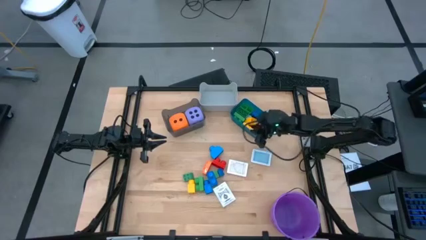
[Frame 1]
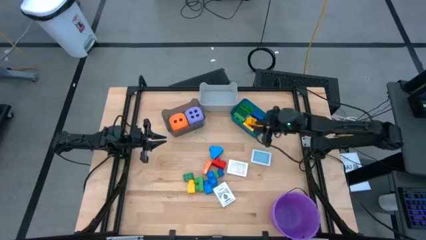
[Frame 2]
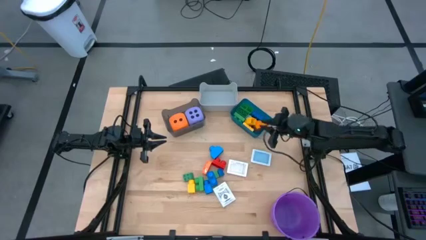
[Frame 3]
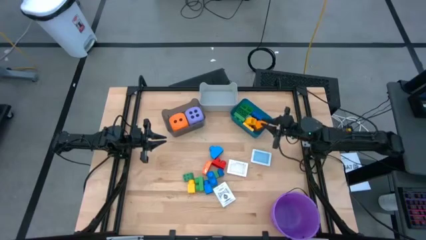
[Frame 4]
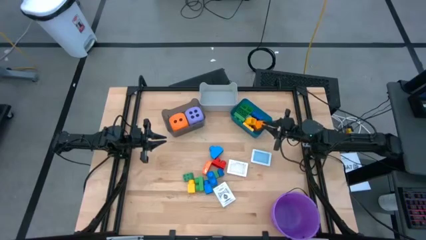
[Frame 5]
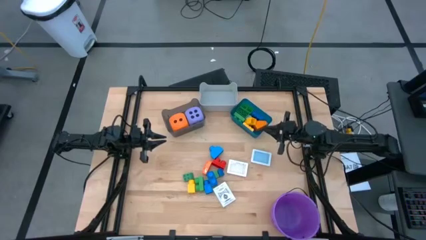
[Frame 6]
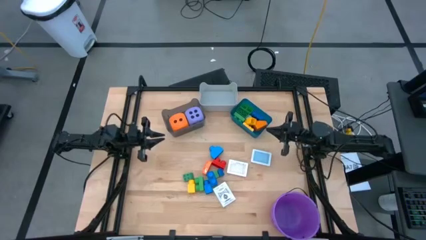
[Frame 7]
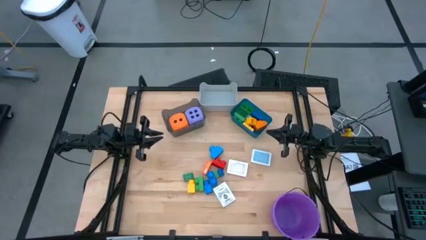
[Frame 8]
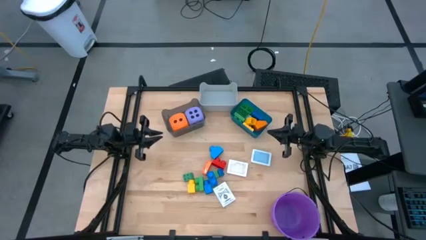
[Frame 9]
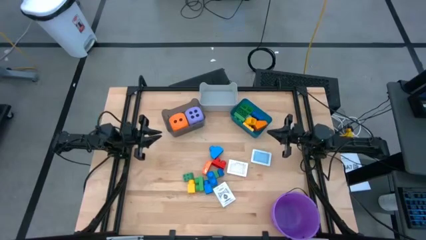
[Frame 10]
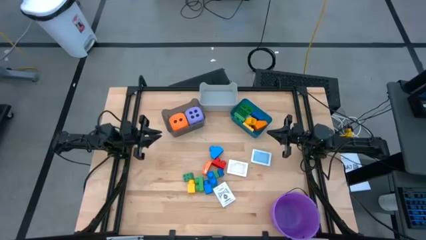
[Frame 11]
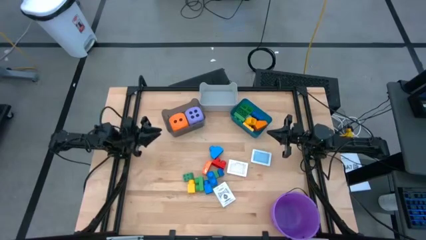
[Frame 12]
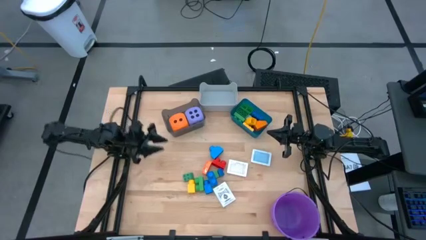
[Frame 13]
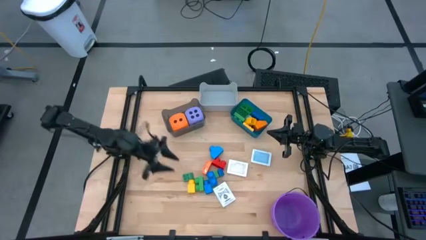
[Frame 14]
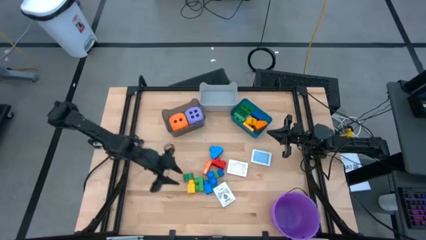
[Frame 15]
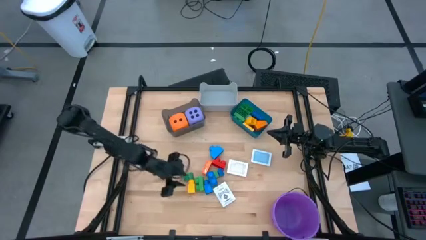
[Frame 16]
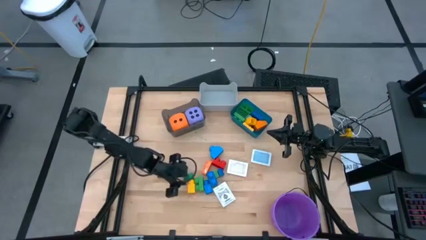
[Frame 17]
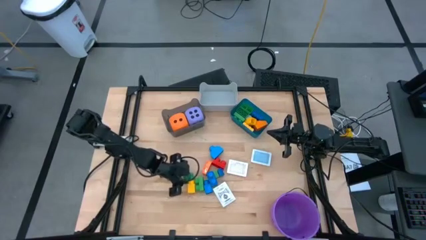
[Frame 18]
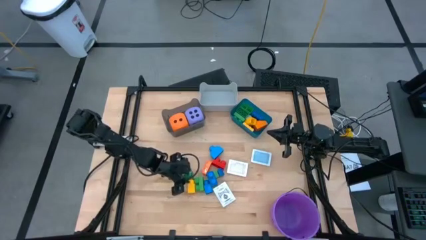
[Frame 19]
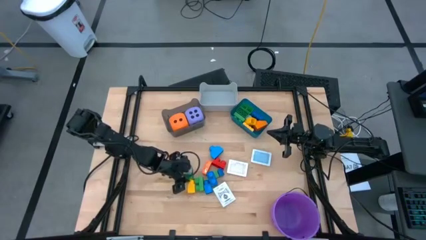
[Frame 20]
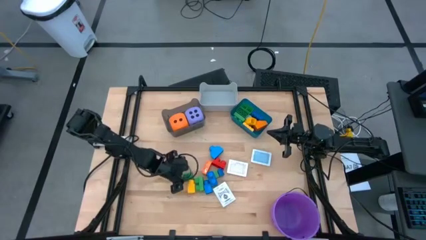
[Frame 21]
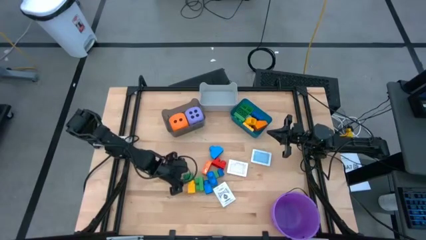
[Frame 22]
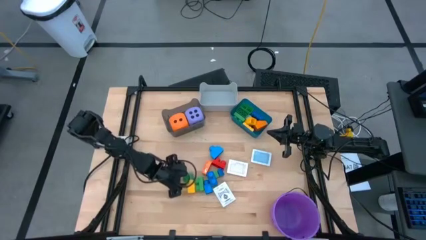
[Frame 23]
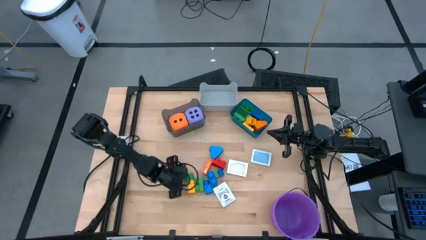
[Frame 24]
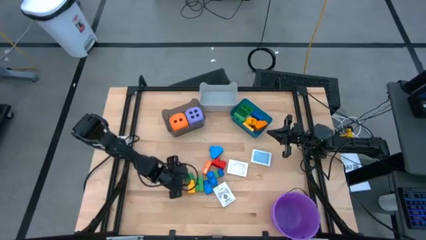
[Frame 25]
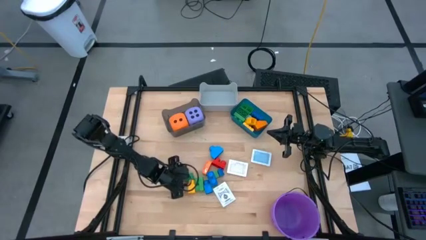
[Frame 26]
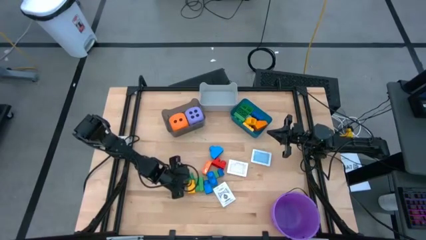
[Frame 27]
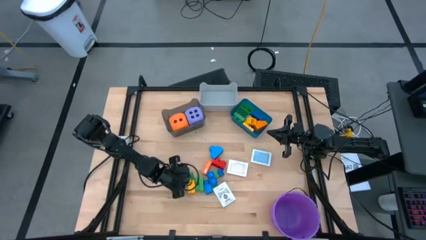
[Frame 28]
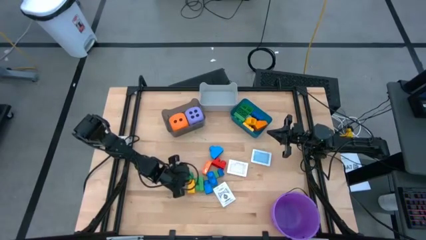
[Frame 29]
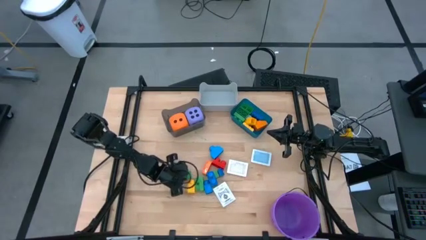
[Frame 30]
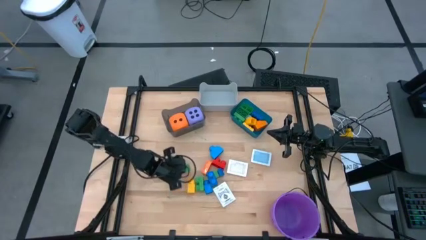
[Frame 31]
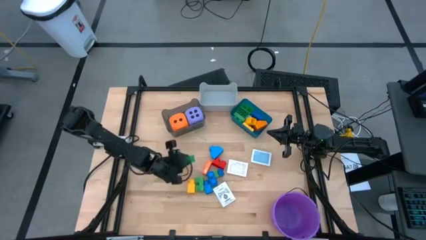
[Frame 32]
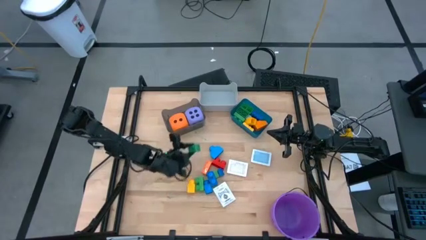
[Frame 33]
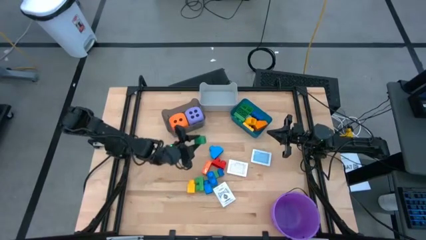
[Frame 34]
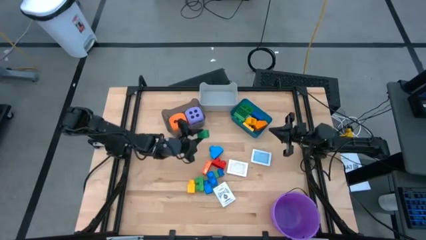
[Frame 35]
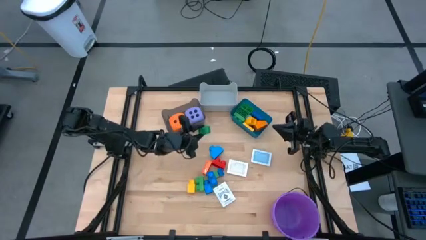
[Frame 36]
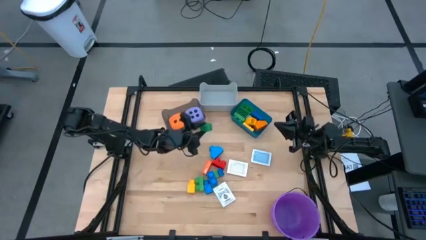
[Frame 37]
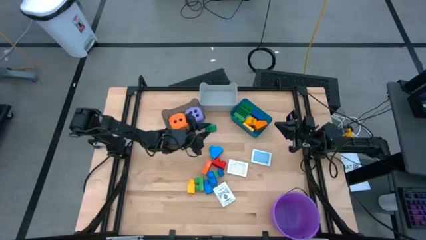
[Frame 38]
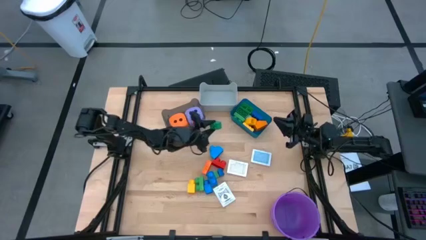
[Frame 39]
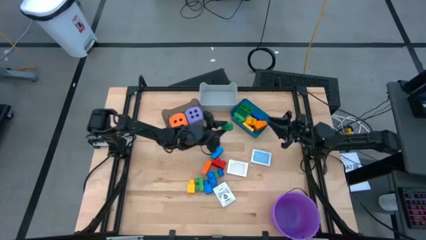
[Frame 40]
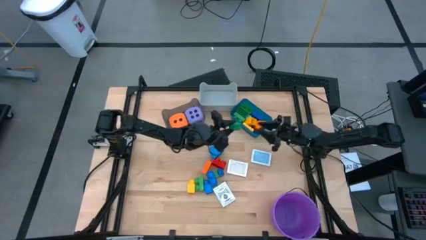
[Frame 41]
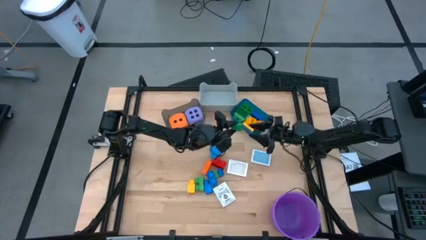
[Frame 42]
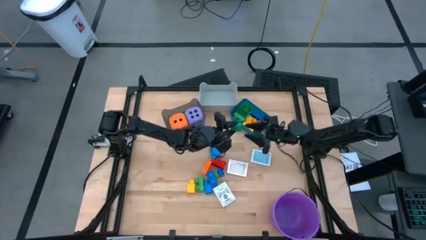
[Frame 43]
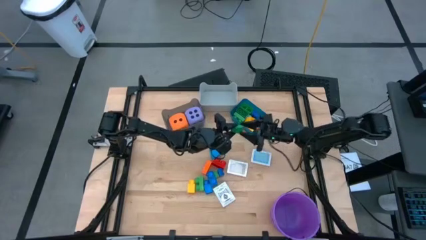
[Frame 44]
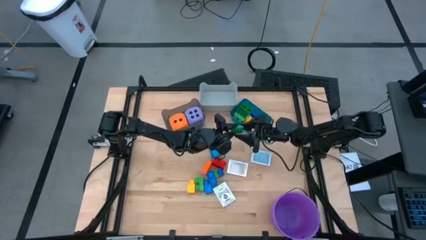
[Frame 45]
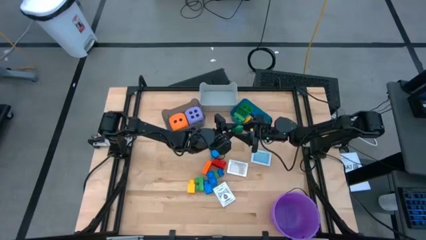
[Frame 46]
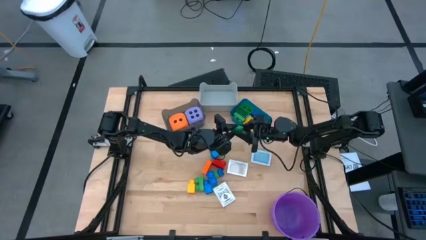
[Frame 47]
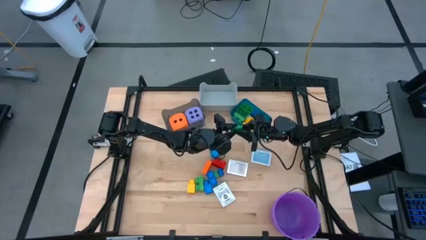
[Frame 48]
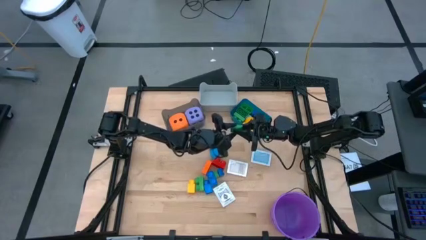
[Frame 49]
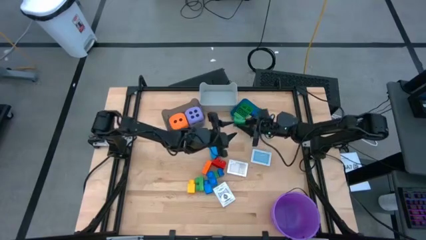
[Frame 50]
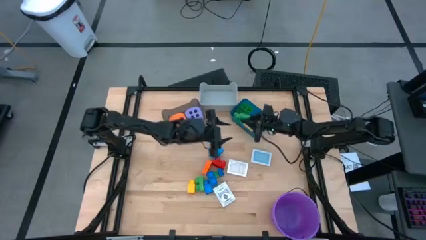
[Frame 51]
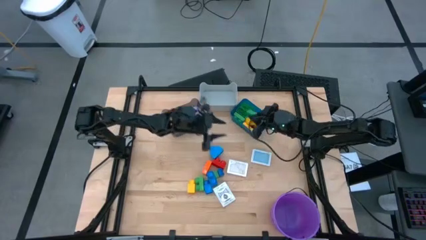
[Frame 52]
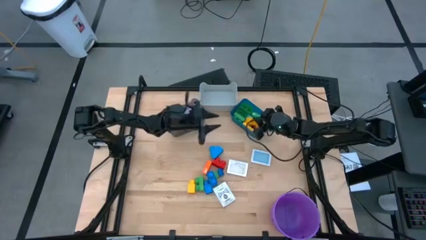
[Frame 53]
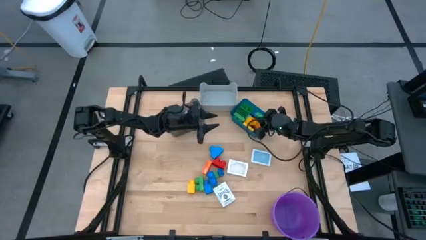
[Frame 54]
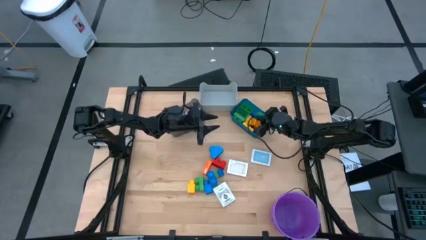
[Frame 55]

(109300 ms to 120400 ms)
Task: Pick & Place Toys
Put the green 4 studs game piece into the blue bin

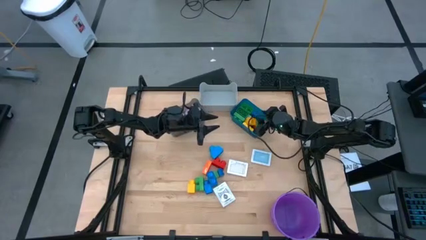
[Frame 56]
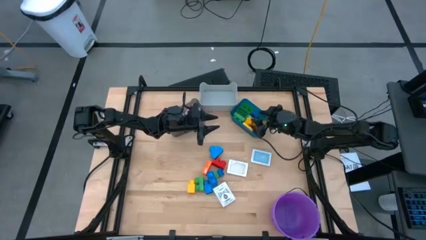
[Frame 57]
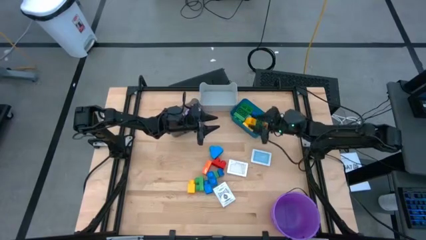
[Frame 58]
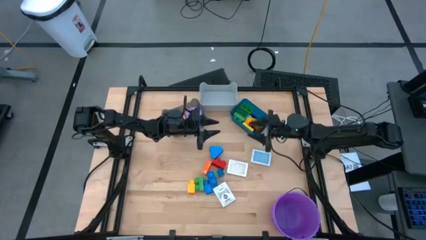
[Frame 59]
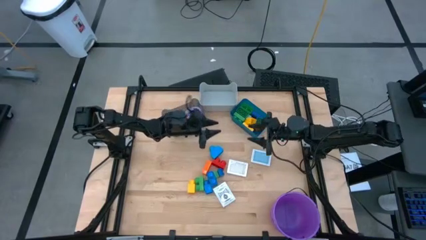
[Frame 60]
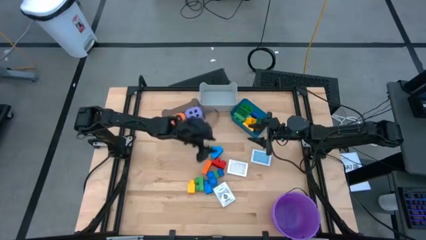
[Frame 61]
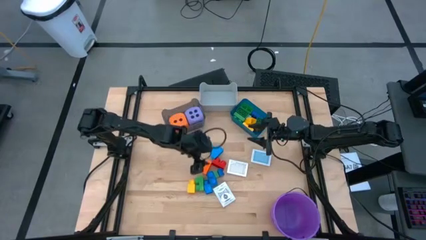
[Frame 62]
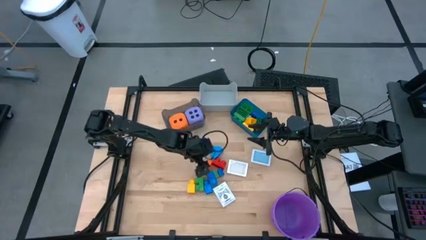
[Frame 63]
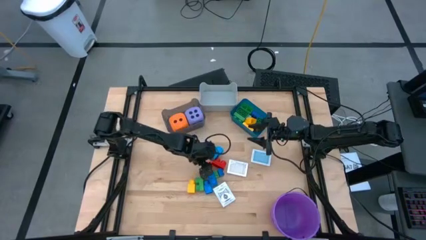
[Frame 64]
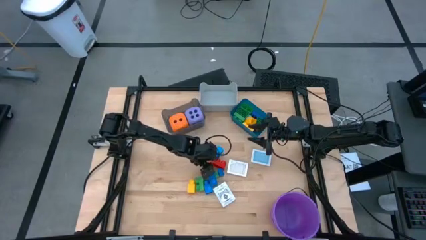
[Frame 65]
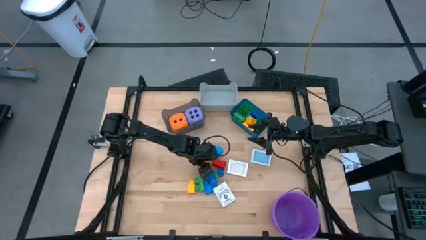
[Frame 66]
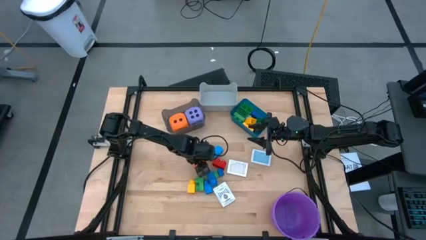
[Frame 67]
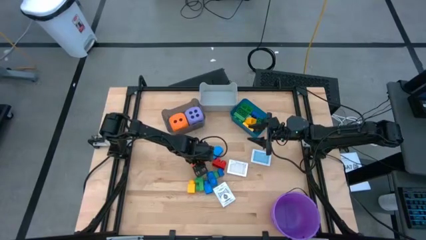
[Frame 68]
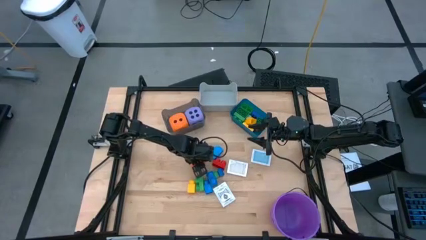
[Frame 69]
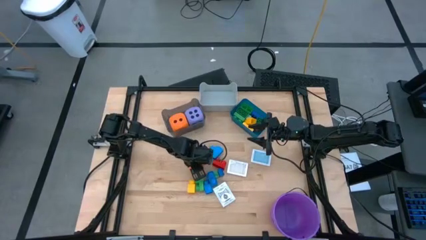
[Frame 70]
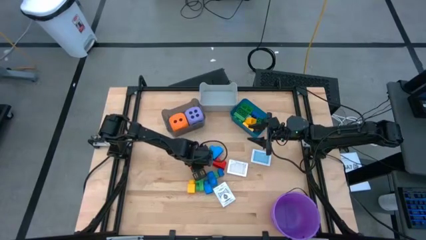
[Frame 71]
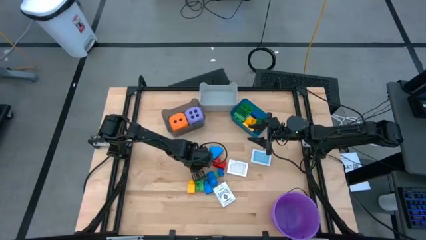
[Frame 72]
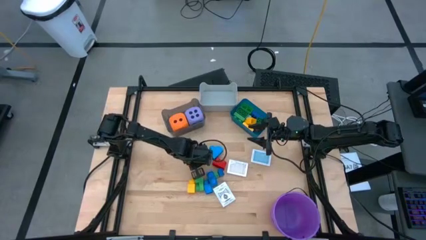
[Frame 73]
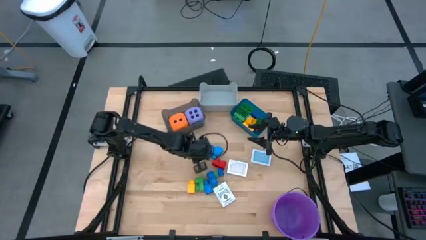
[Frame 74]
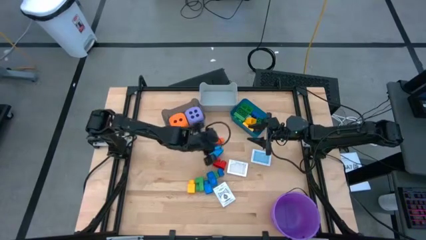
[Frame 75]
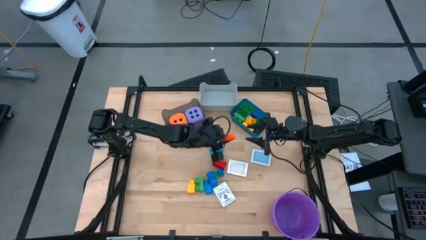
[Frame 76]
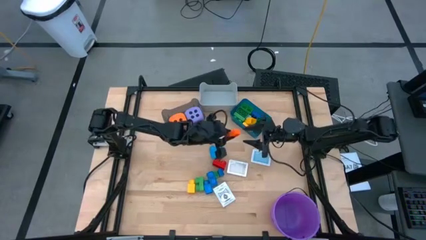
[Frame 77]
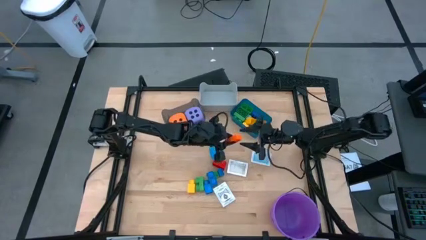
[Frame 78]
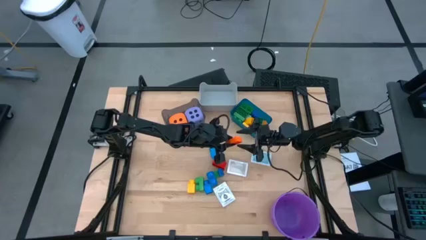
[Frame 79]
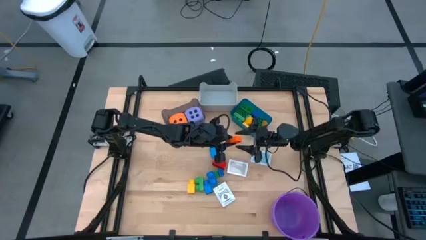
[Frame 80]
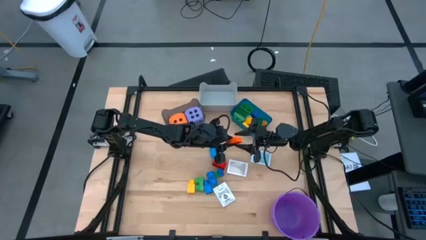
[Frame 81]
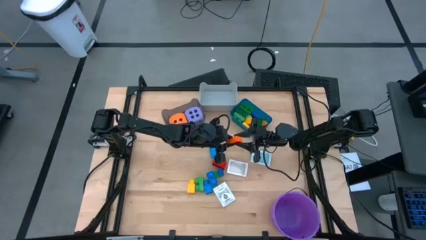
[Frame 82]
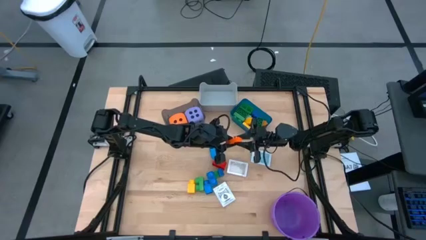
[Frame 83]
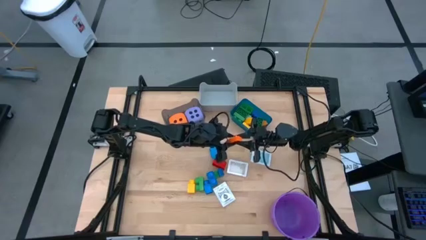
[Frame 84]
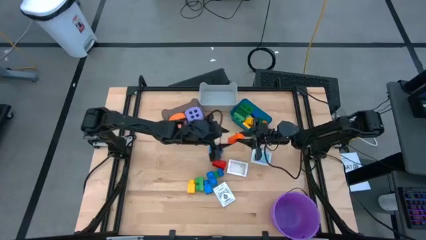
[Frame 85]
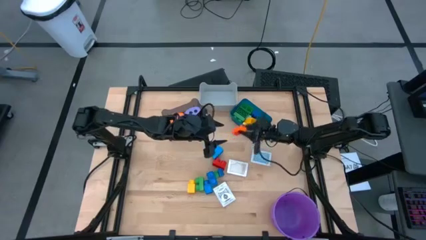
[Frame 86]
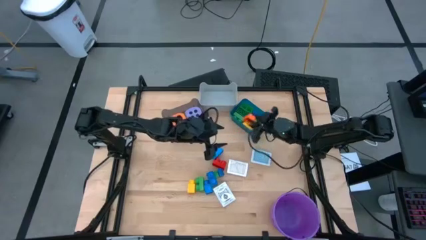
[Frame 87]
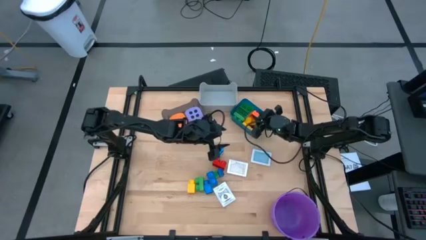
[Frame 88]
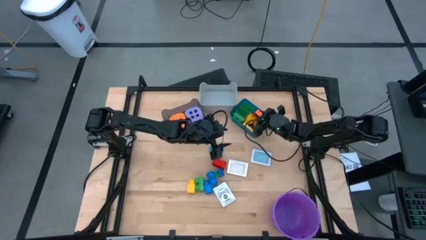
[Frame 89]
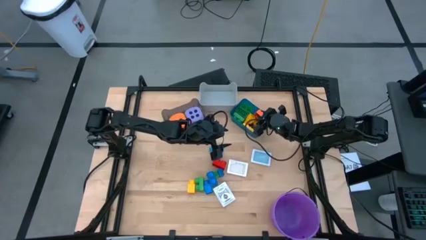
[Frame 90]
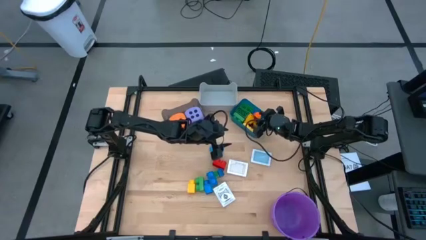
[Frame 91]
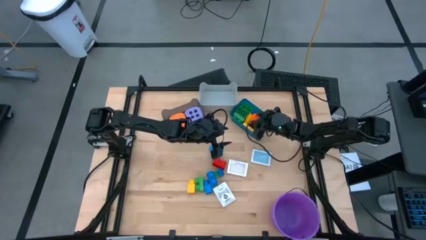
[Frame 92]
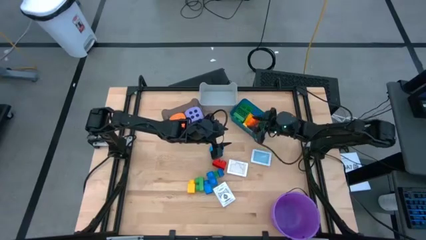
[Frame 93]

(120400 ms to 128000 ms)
Put the orange 8 studs game piece into the blue bin
